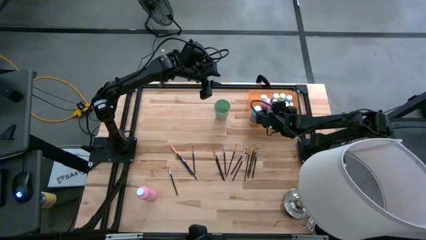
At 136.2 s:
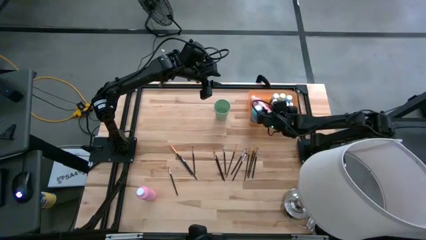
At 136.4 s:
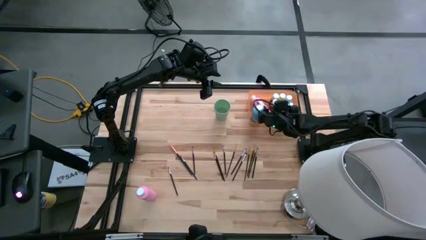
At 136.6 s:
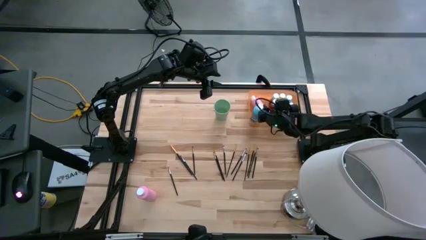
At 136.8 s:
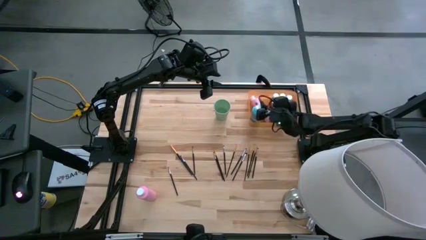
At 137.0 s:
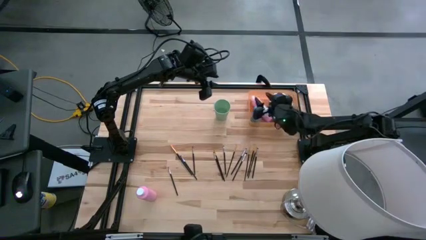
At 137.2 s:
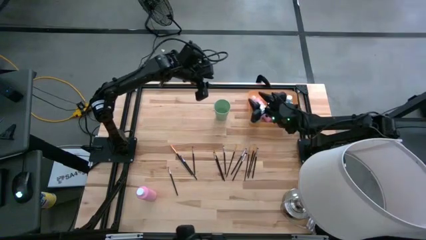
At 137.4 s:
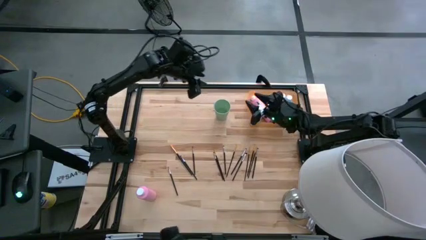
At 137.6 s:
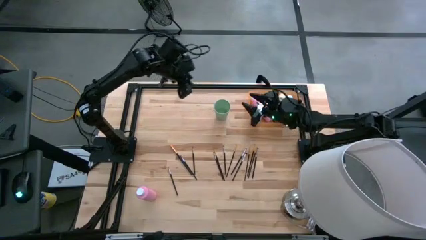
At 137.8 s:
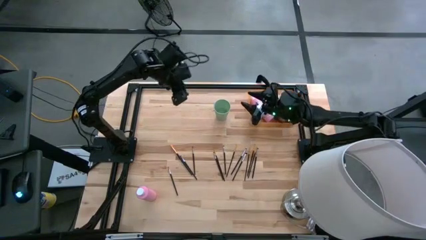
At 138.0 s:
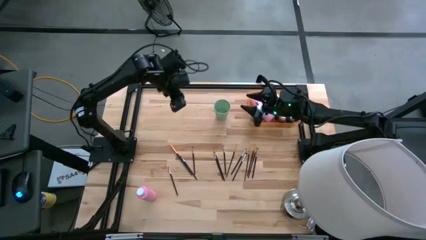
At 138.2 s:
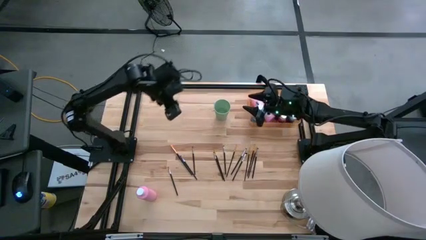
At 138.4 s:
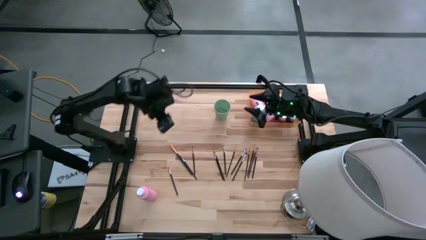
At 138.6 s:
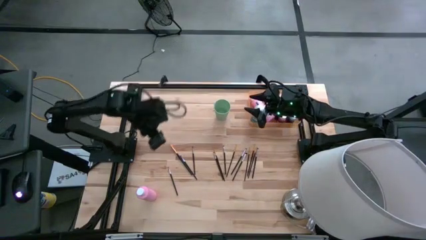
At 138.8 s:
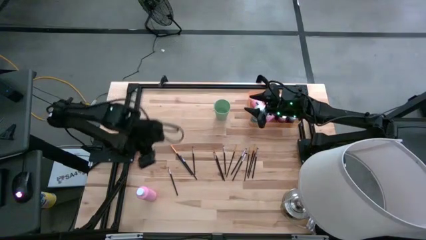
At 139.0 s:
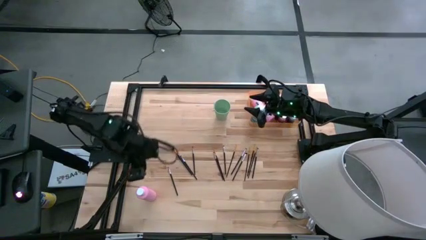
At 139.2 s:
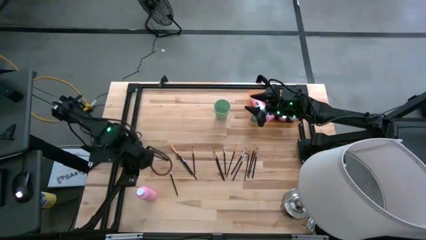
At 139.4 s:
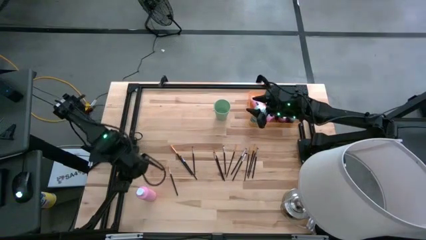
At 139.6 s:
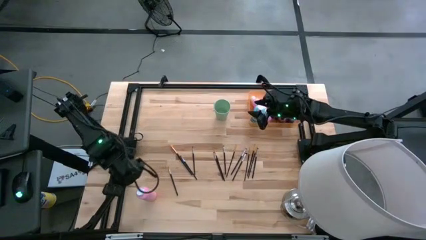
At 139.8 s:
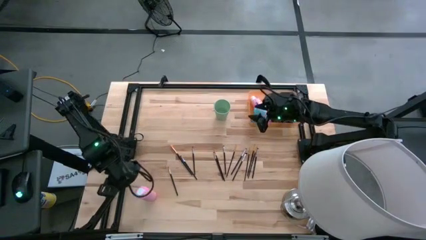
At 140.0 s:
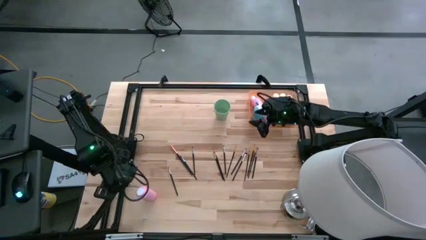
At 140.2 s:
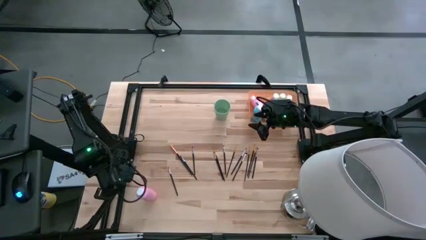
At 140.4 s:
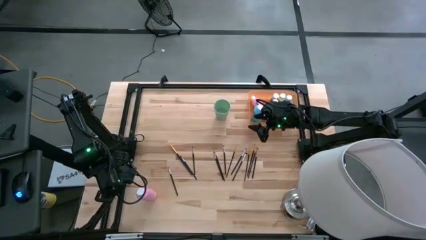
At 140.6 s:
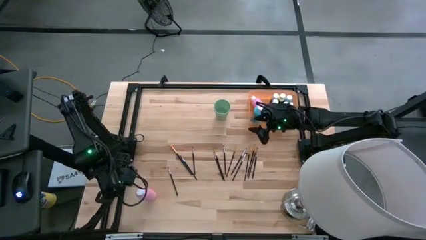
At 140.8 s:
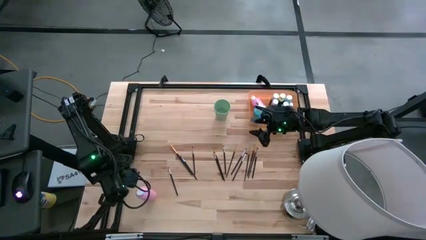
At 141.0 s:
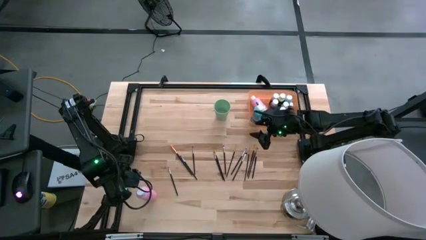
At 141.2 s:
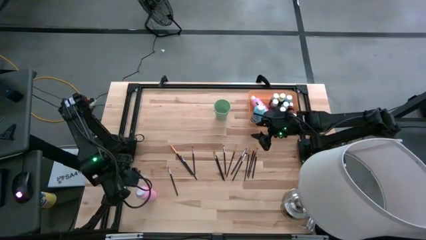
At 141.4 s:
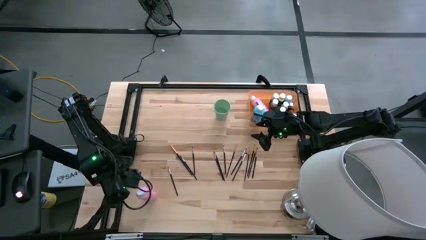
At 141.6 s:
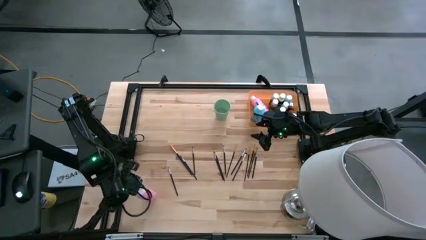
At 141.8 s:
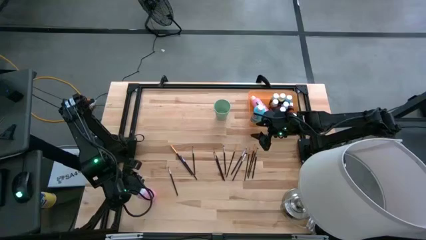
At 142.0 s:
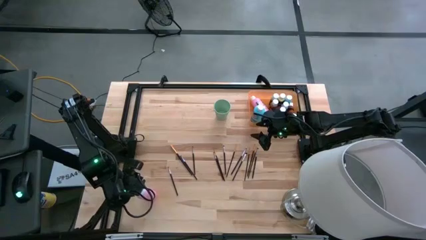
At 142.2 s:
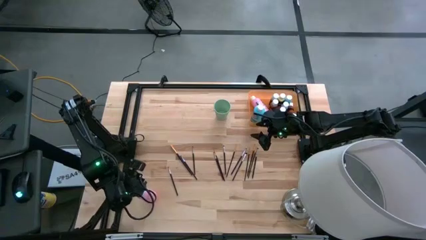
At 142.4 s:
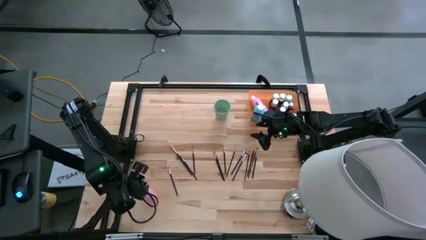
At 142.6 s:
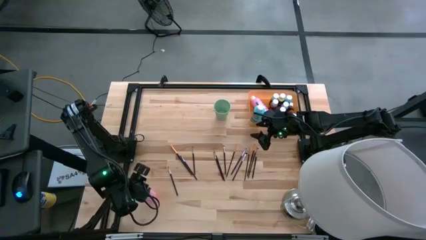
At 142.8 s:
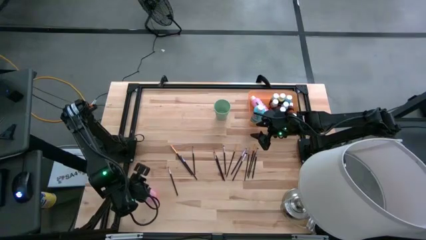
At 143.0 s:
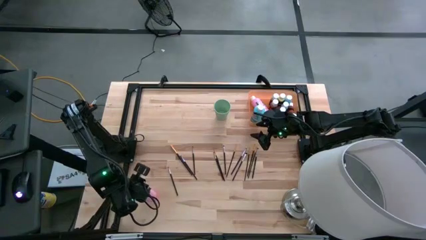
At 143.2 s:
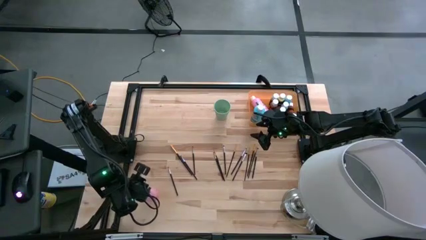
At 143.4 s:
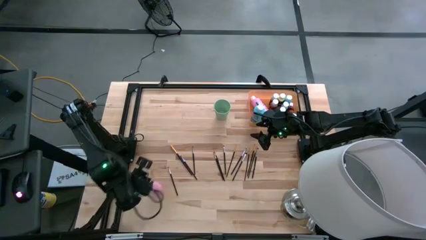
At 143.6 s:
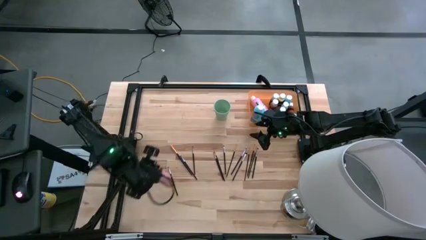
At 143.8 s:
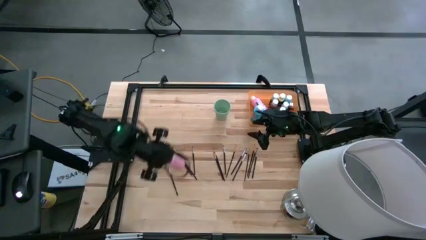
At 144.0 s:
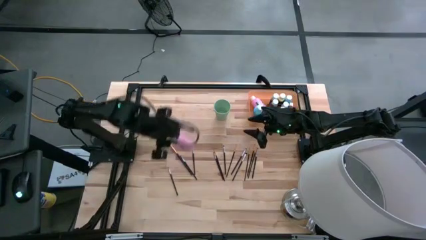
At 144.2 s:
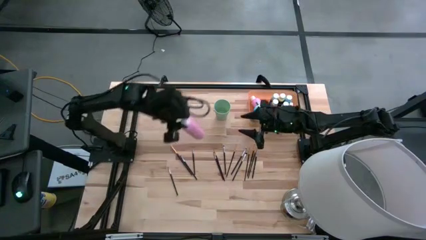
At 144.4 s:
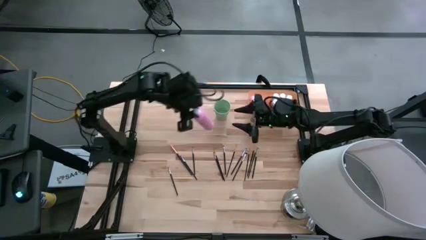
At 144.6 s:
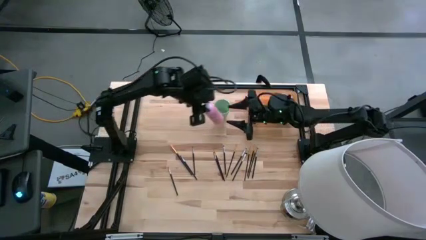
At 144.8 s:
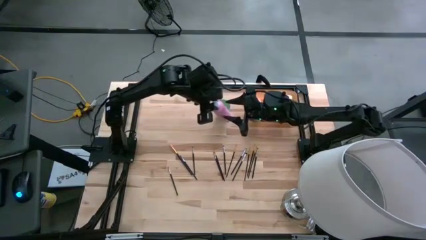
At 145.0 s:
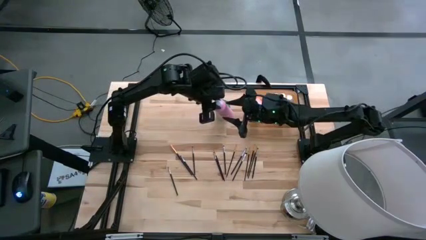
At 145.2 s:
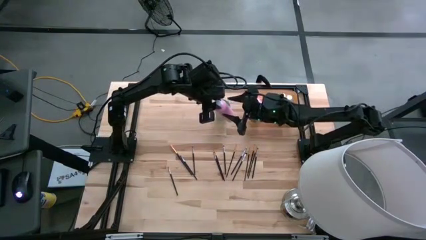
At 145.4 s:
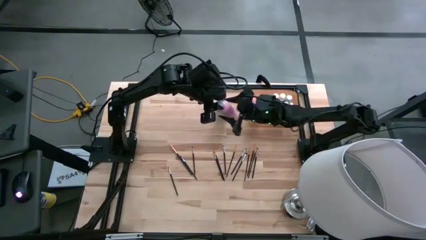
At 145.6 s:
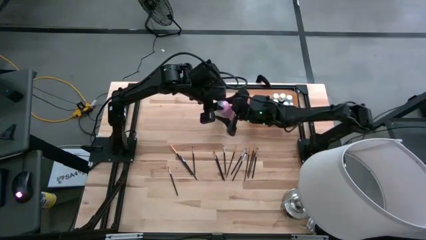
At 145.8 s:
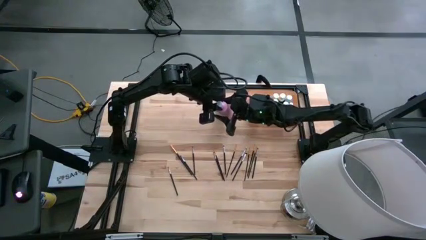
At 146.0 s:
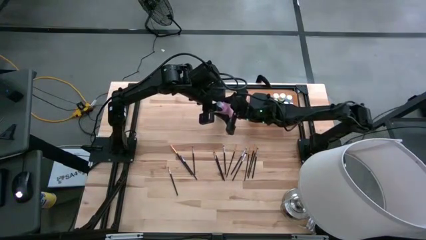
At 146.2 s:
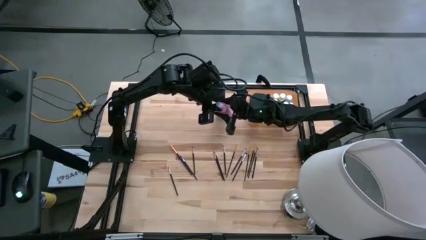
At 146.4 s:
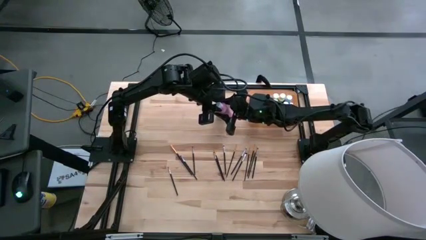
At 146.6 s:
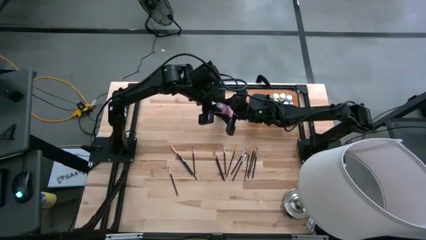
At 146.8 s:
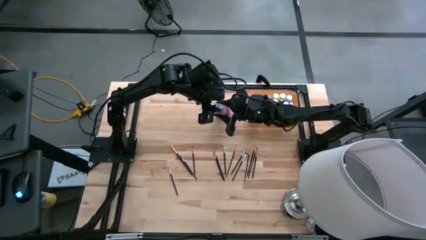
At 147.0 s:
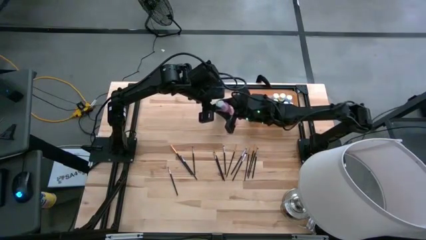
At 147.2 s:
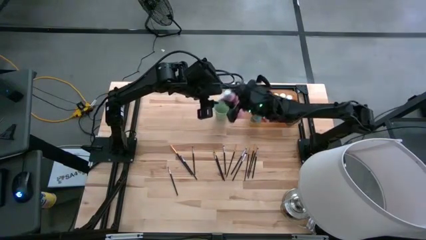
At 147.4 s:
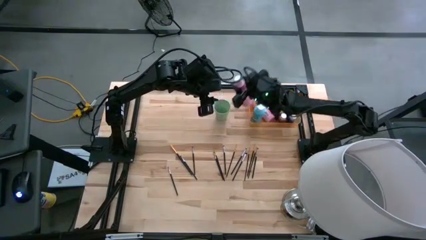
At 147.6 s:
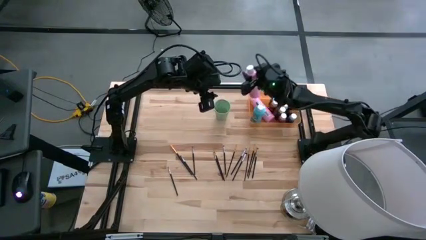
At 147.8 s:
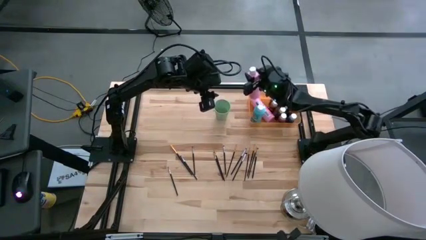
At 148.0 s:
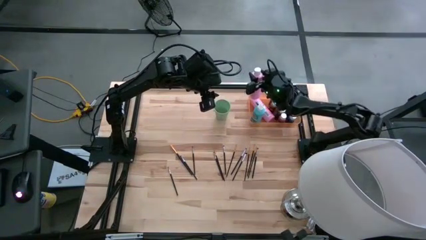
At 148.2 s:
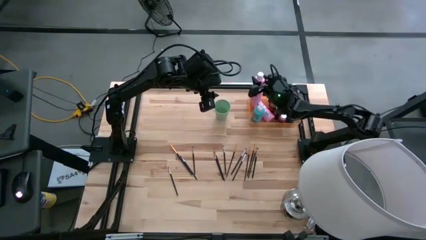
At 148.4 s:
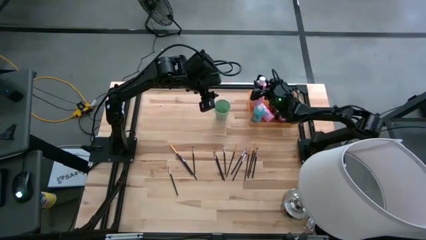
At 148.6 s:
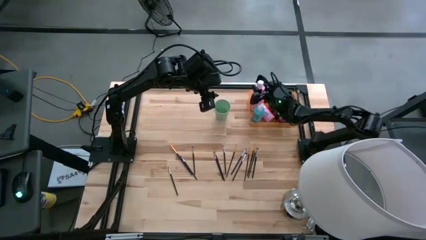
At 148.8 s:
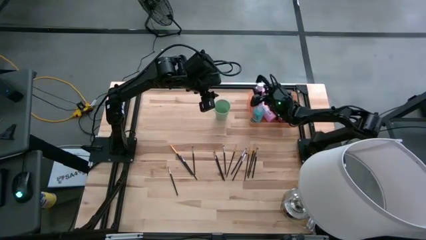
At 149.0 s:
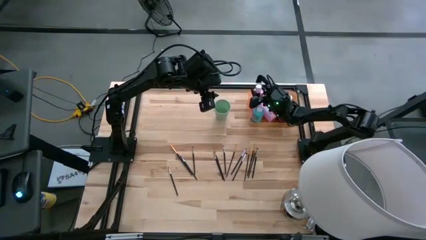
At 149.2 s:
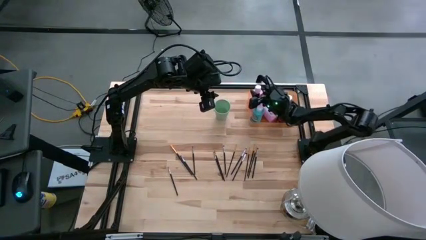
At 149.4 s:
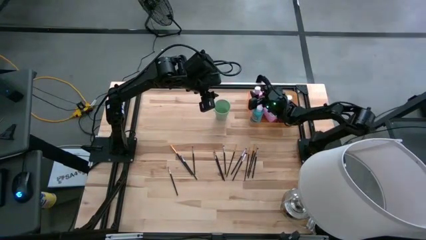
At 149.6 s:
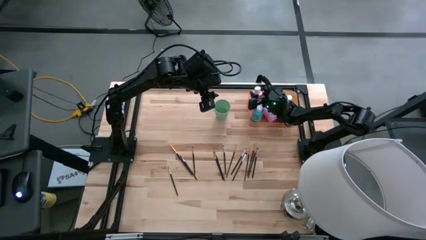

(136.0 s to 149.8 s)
Task: Pick & Place Paint Supplies
Put the large pink paint bottle into the orange bin

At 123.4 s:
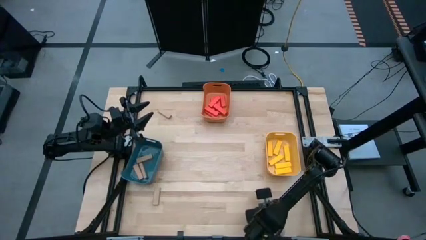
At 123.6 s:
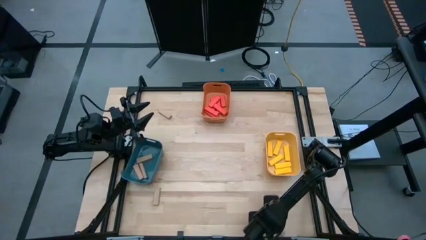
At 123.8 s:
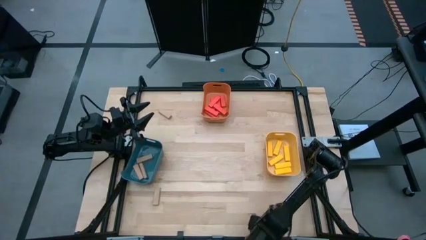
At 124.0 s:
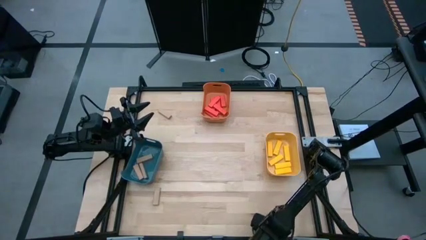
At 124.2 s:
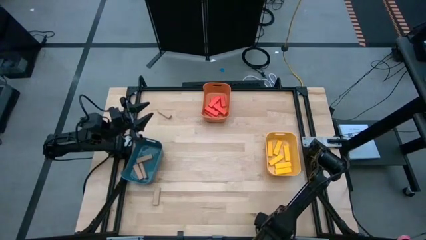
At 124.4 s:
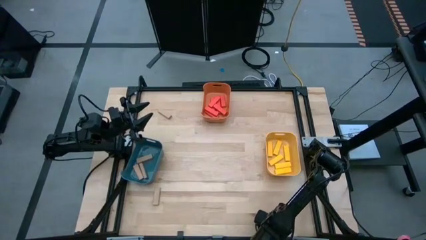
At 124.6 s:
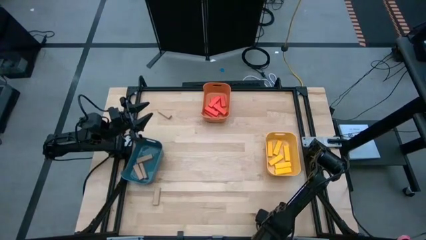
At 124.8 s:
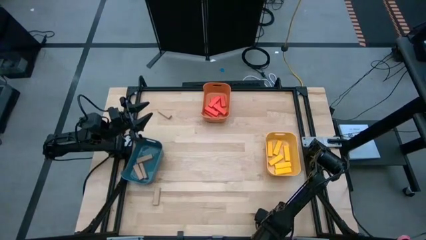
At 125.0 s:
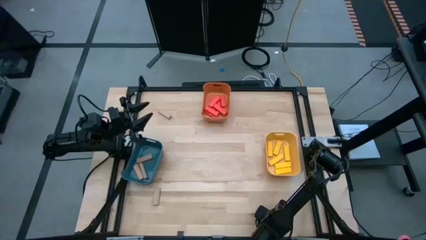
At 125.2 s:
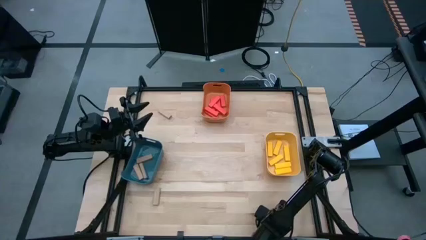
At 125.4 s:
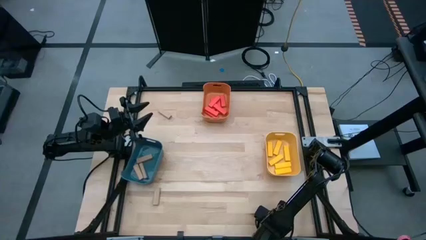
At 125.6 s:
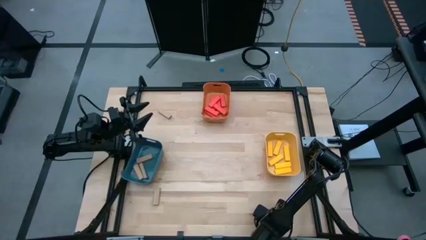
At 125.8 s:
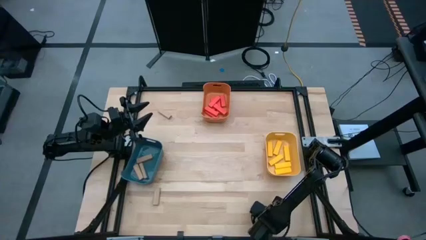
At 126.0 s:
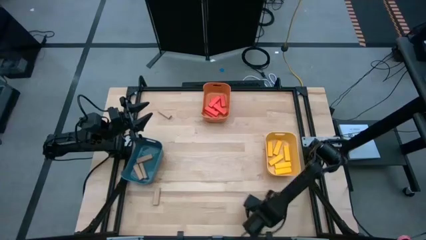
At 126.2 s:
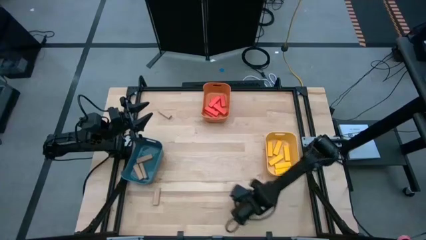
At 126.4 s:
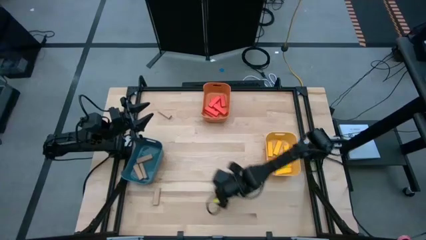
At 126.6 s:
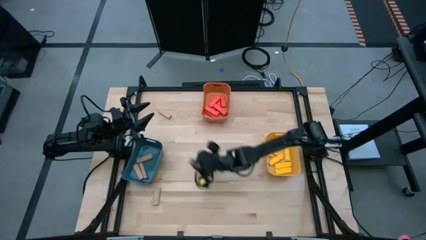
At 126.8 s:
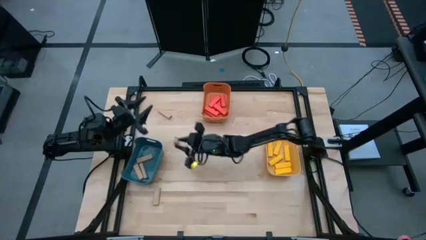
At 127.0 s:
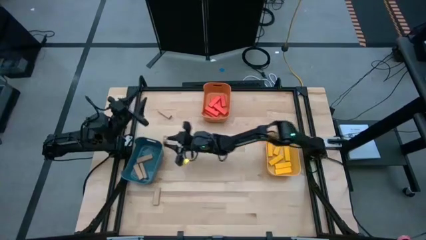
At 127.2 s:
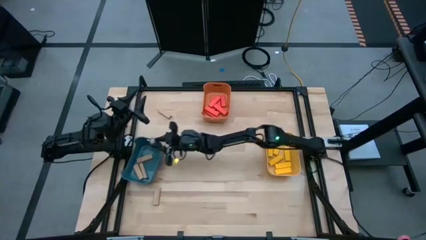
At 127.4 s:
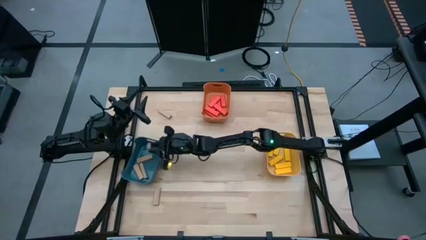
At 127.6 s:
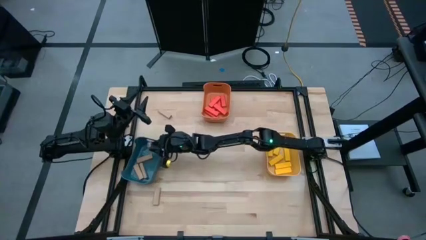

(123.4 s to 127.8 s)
Task: Sort blocks
Put the bottom right brown block into the blue bin
